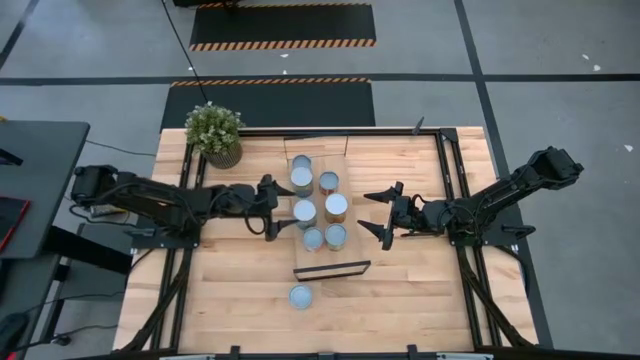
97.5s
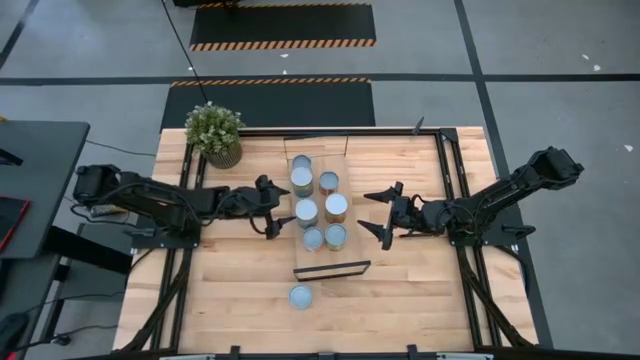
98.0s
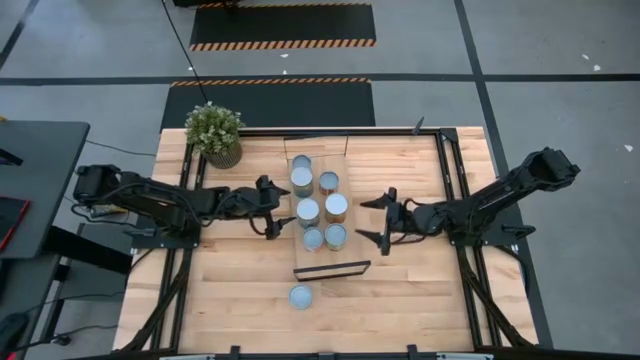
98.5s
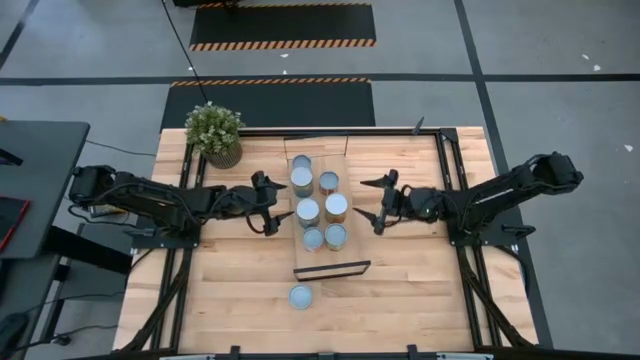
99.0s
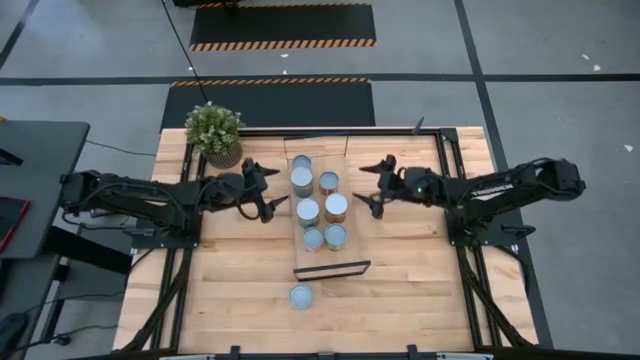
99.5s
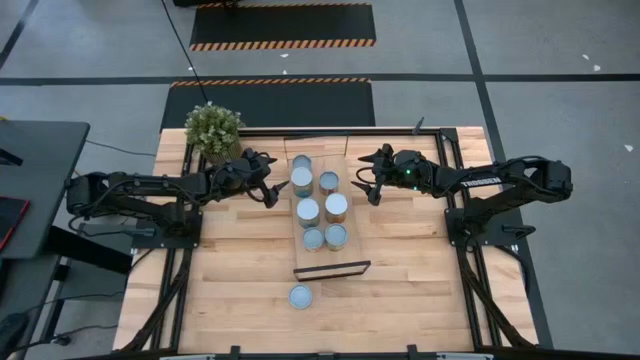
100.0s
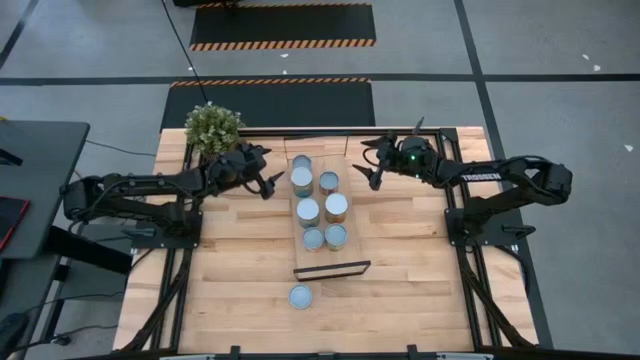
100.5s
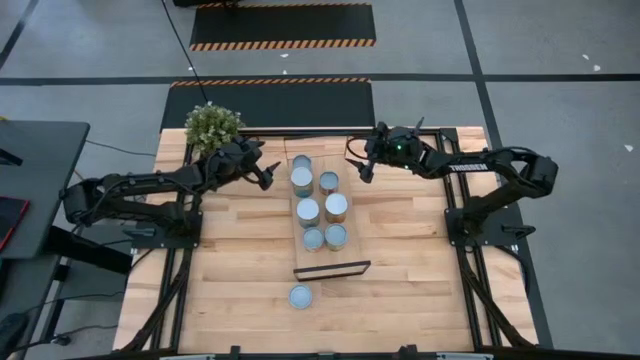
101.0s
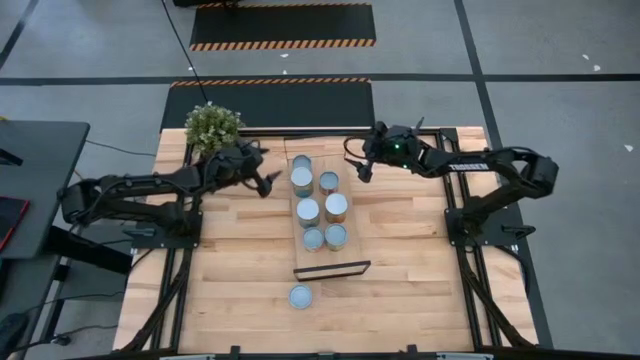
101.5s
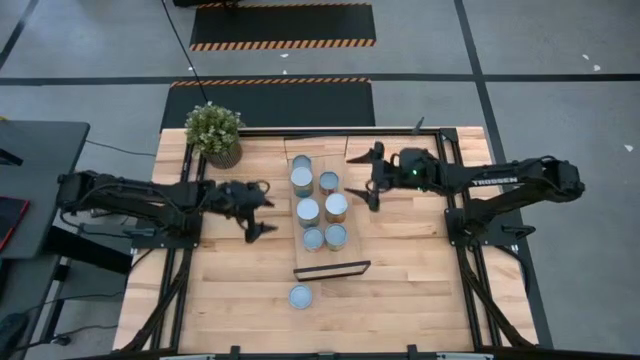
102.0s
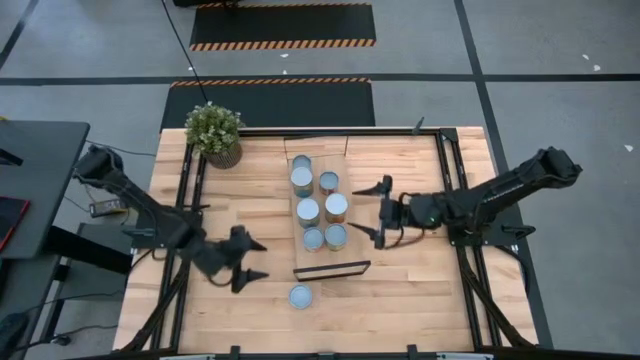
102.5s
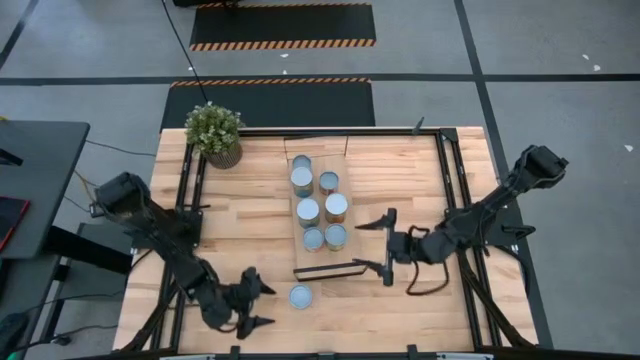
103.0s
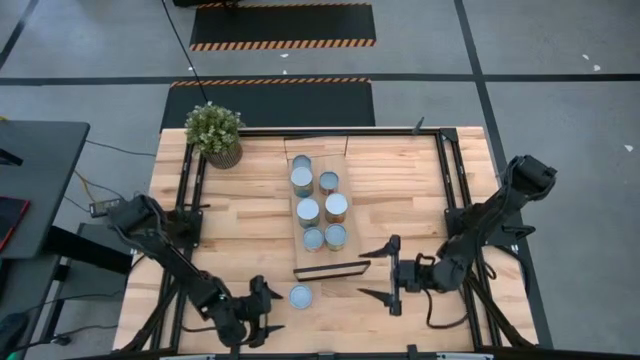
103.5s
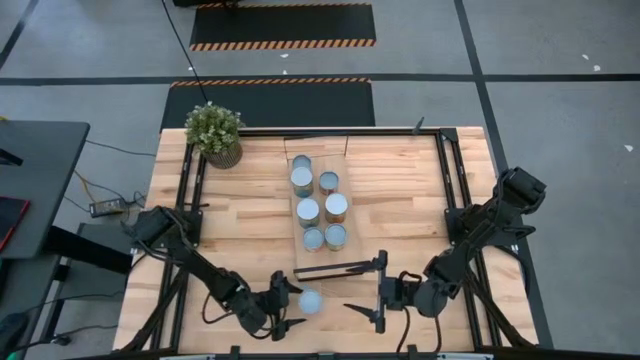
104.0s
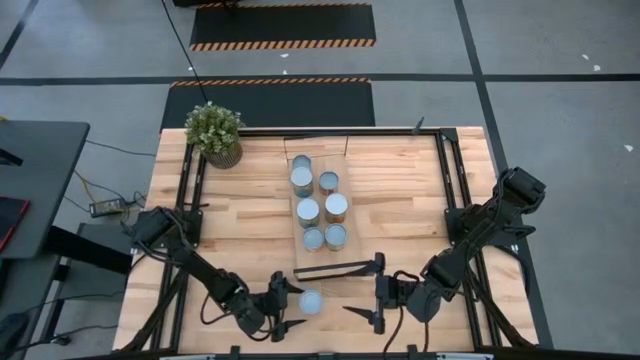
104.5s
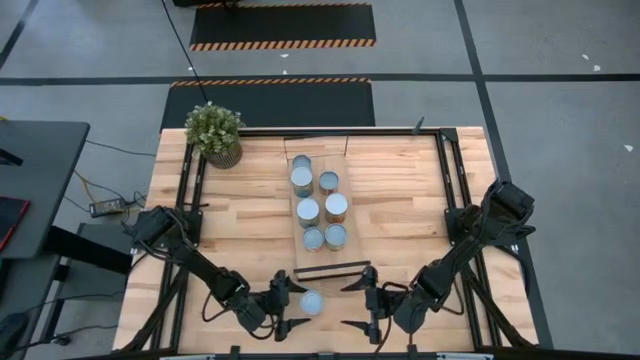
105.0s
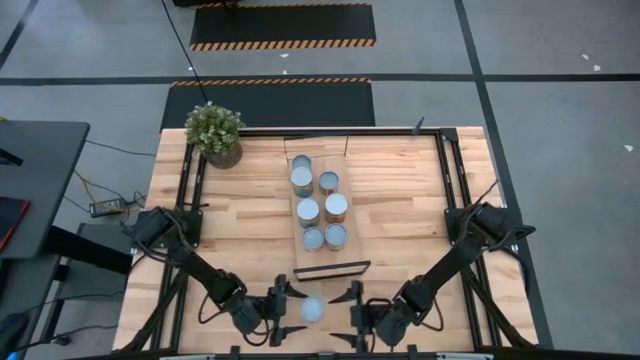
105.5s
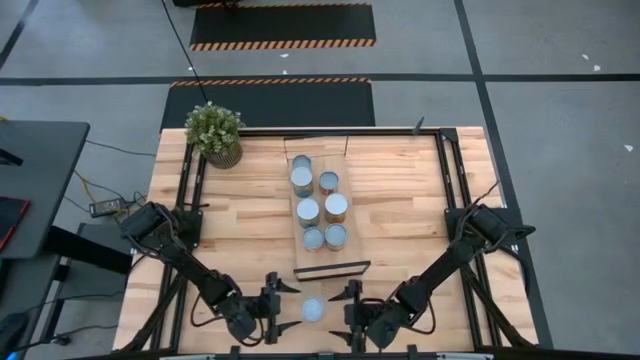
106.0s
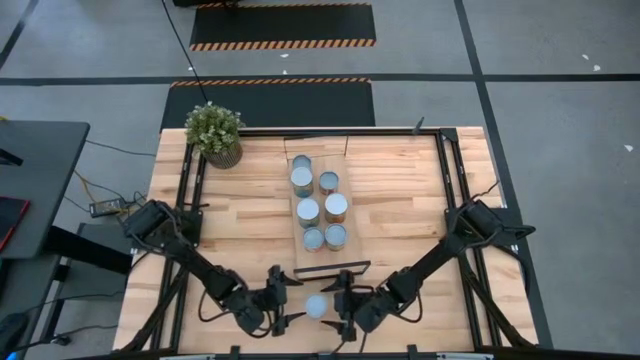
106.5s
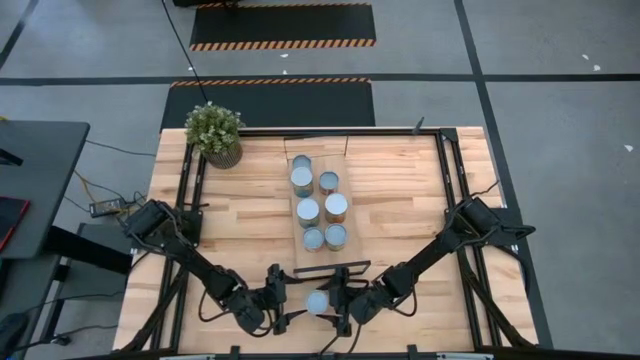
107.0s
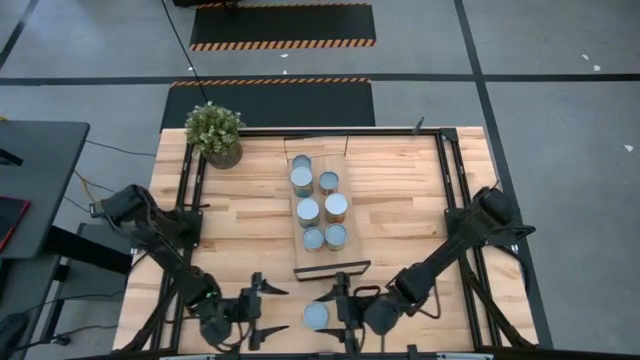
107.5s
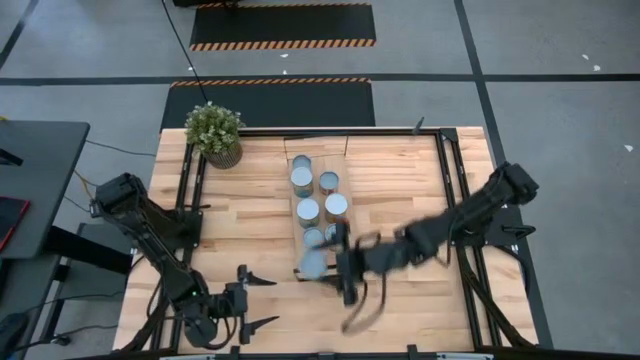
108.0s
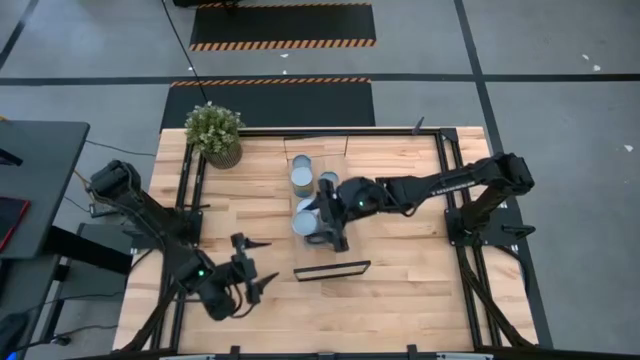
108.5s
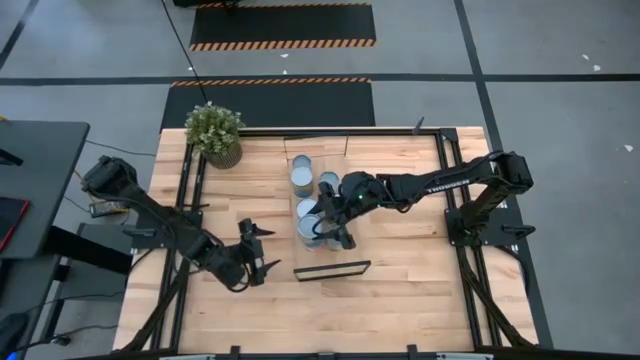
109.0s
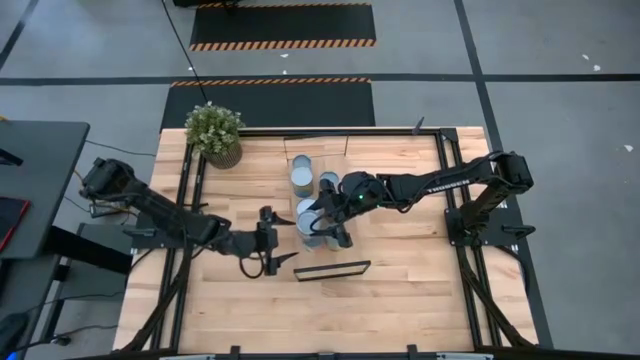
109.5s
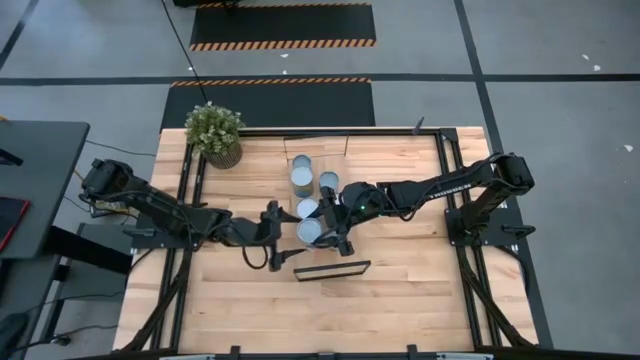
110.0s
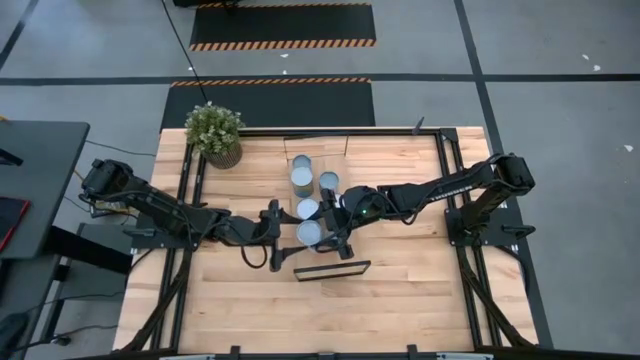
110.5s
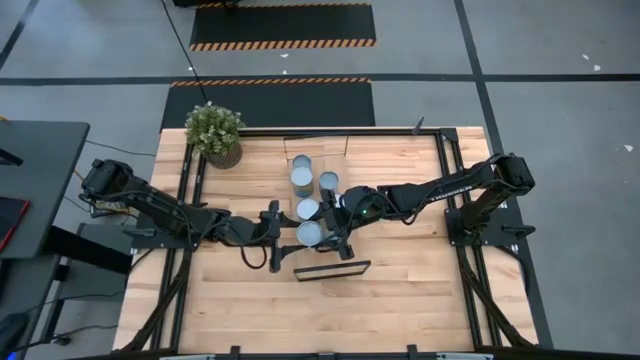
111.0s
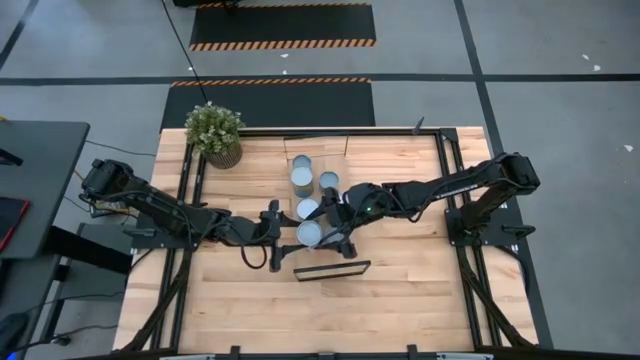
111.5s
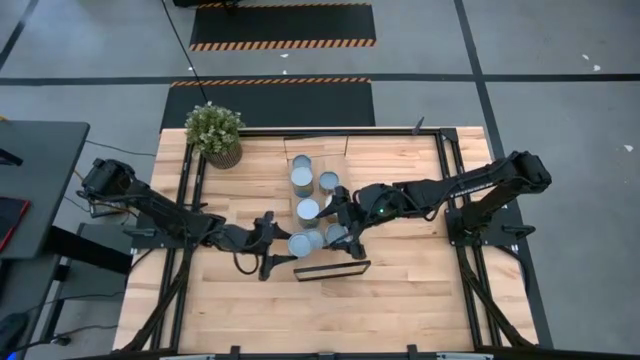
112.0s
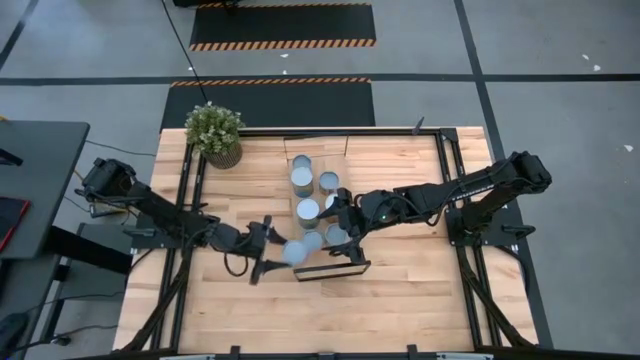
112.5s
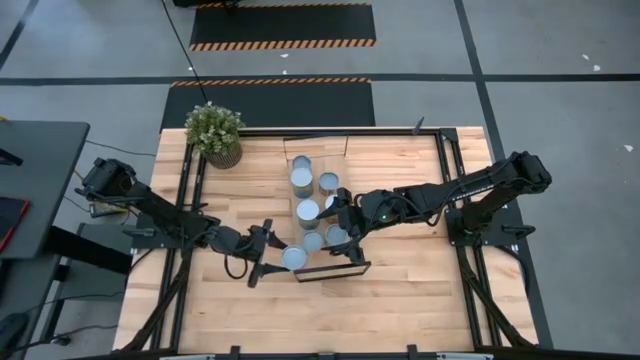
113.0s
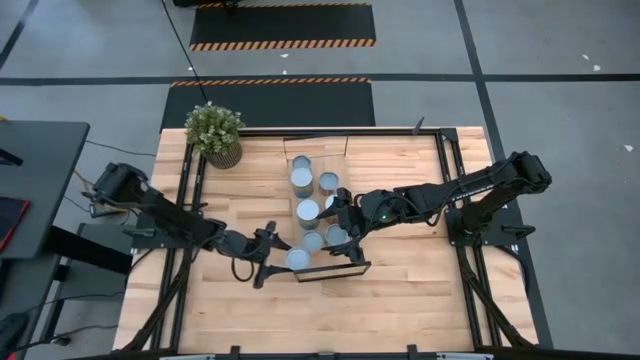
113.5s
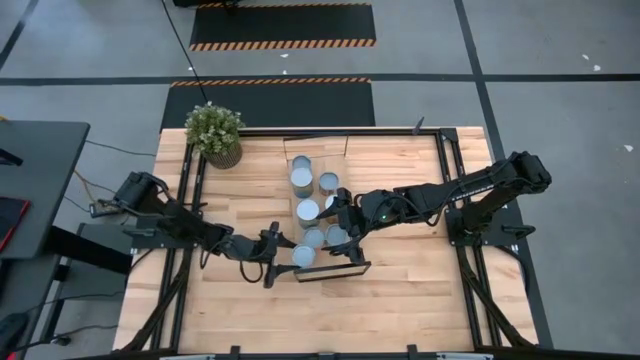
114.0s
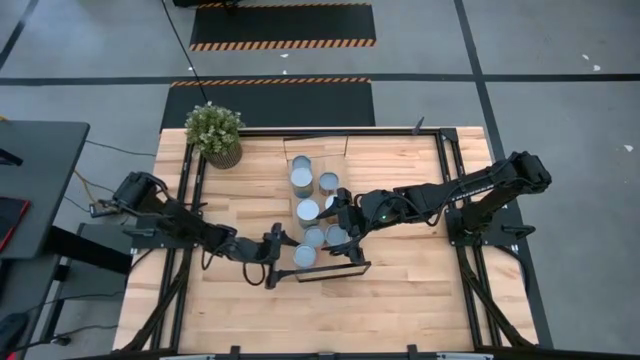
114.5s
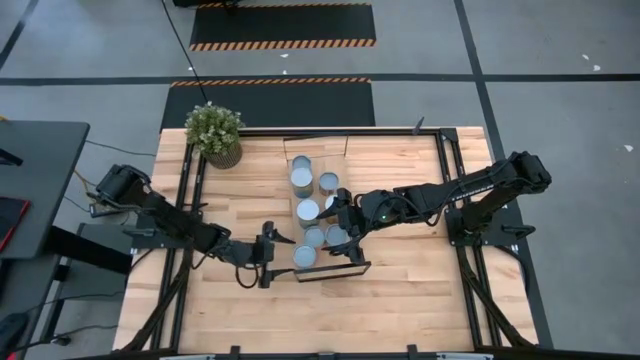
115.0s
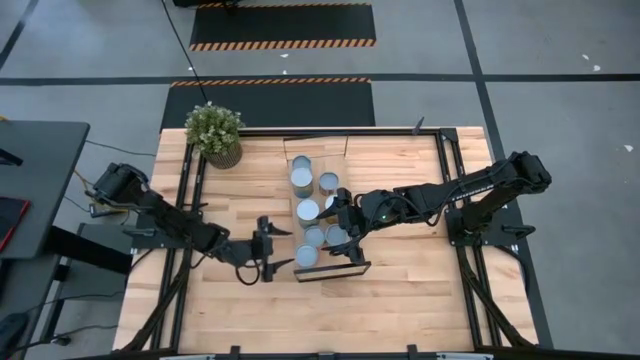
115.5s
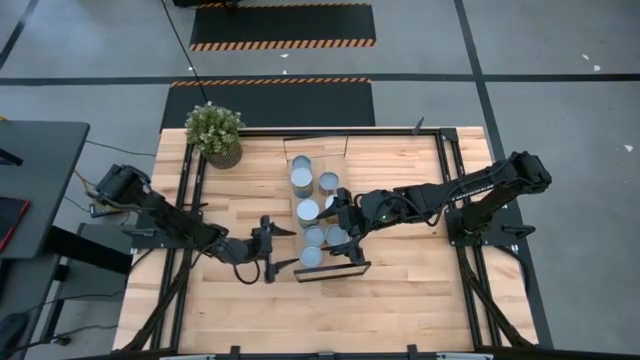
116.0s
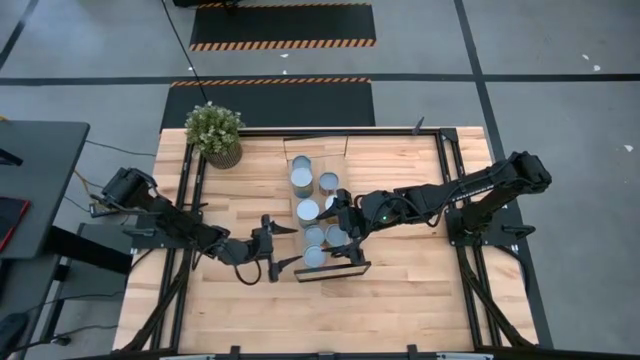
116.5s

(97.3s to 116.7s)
Task: Pick and place cans onto a shelf
Put the canned chicken soup on the shelf
